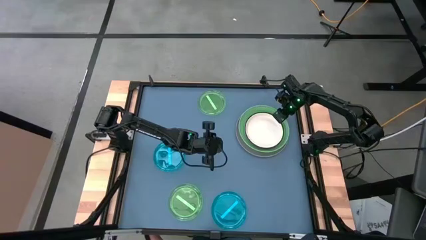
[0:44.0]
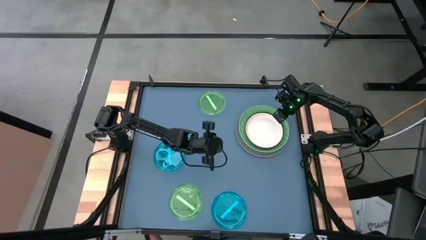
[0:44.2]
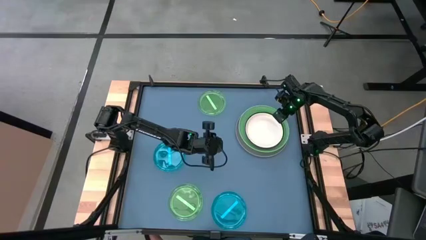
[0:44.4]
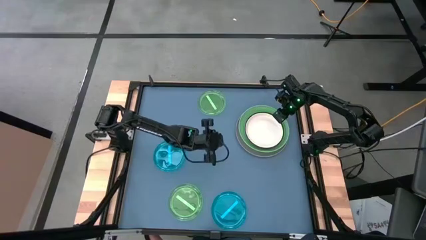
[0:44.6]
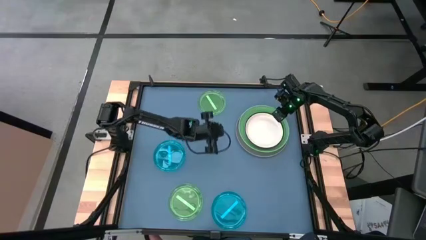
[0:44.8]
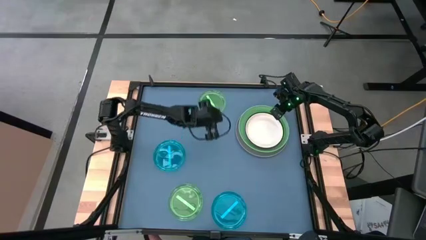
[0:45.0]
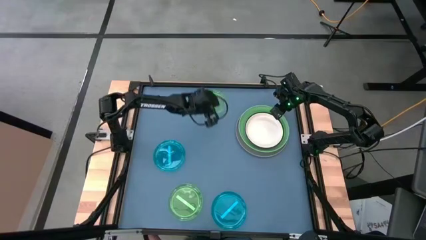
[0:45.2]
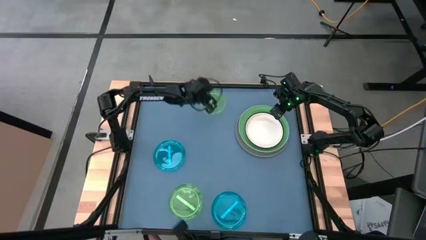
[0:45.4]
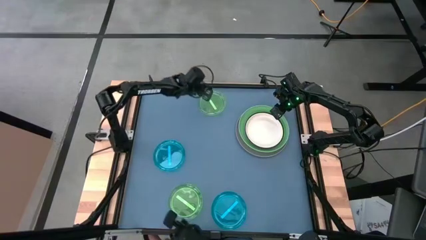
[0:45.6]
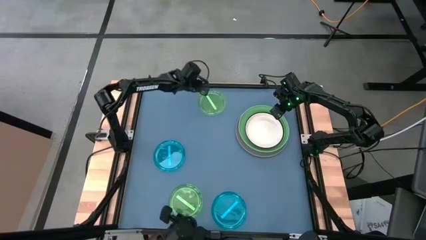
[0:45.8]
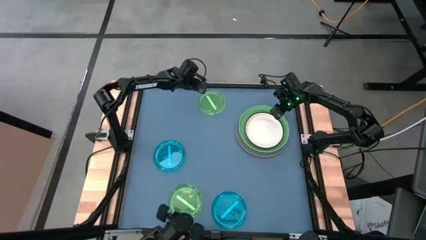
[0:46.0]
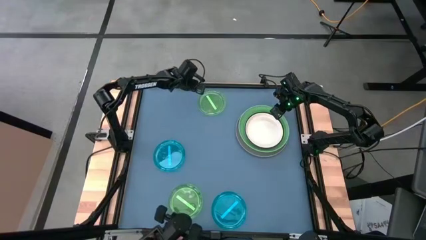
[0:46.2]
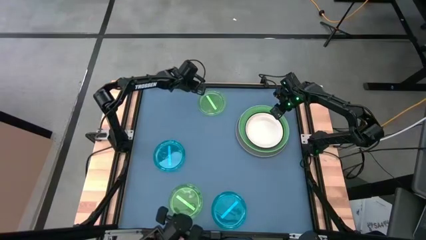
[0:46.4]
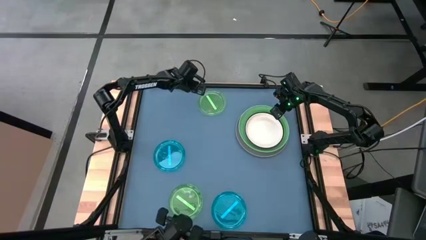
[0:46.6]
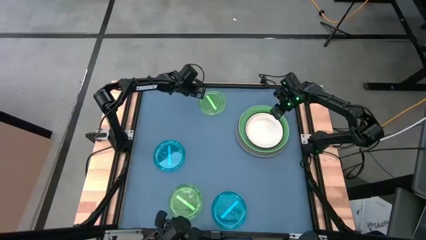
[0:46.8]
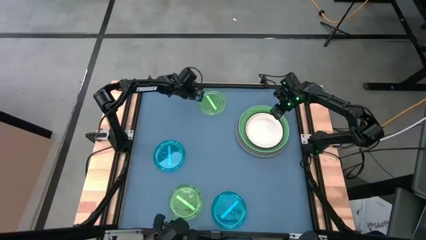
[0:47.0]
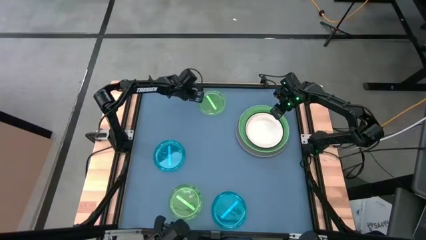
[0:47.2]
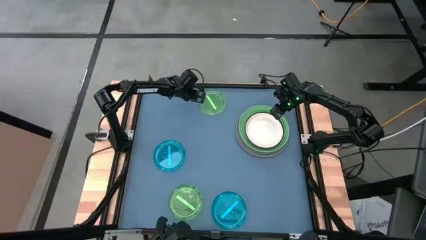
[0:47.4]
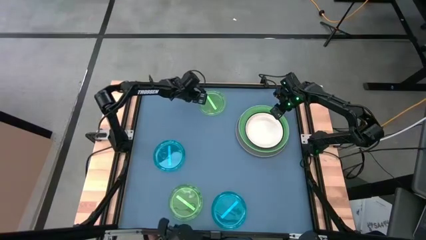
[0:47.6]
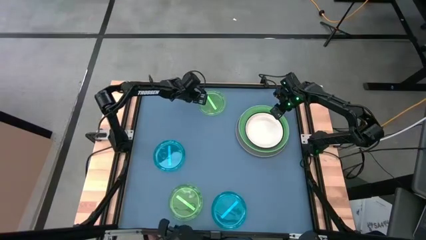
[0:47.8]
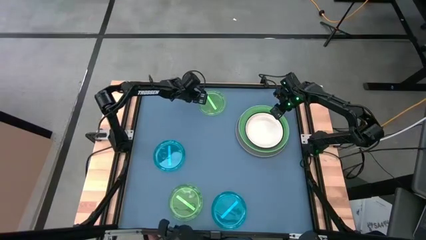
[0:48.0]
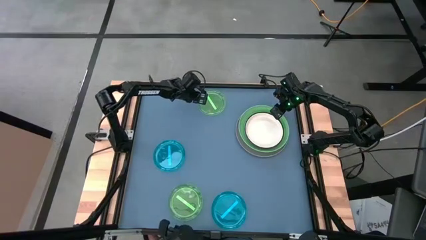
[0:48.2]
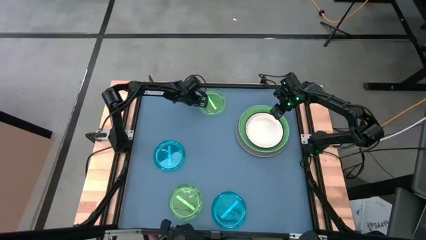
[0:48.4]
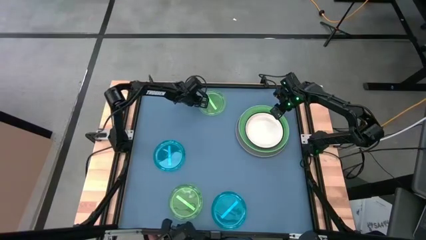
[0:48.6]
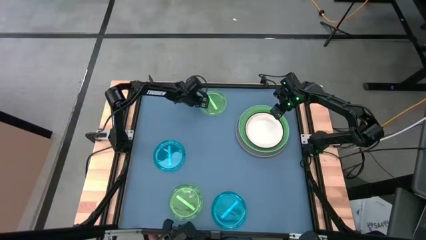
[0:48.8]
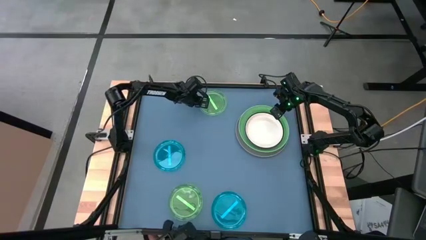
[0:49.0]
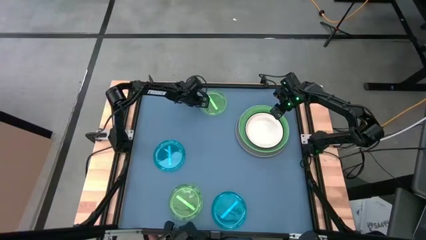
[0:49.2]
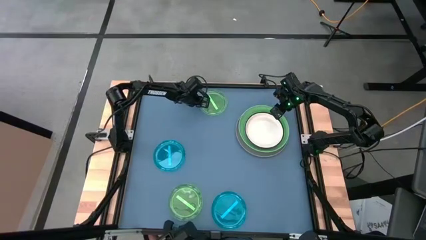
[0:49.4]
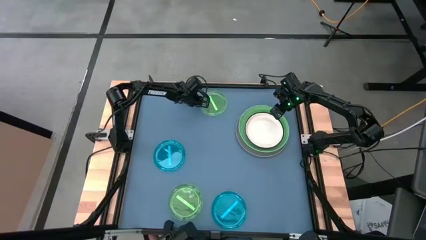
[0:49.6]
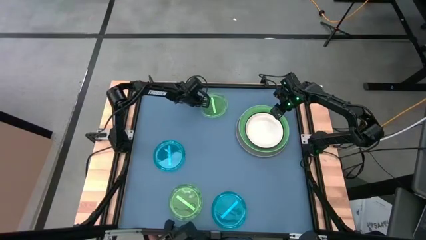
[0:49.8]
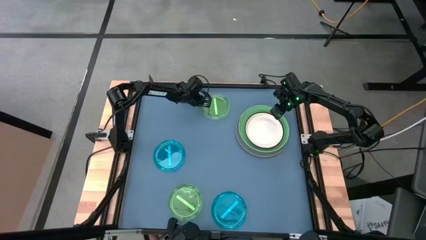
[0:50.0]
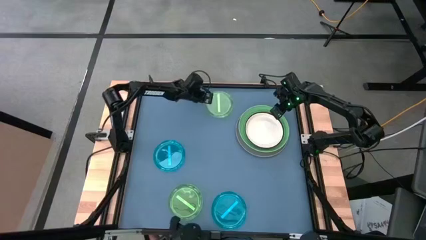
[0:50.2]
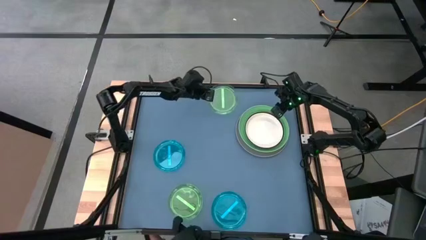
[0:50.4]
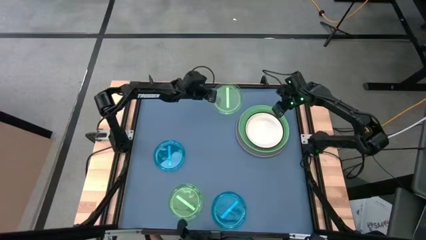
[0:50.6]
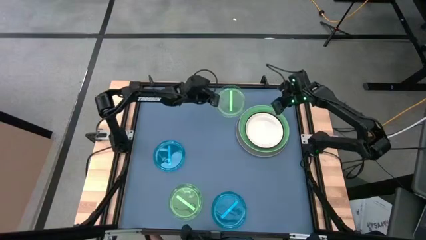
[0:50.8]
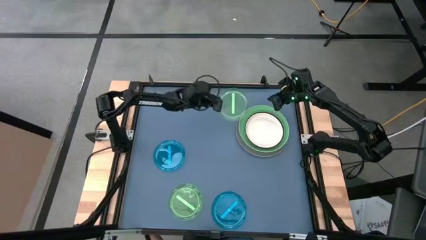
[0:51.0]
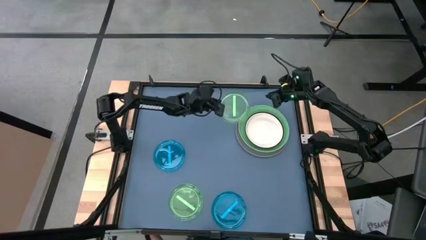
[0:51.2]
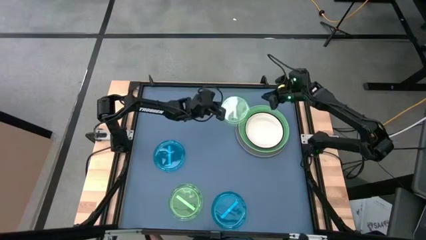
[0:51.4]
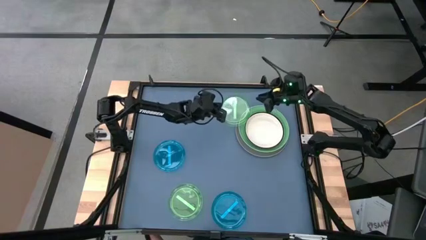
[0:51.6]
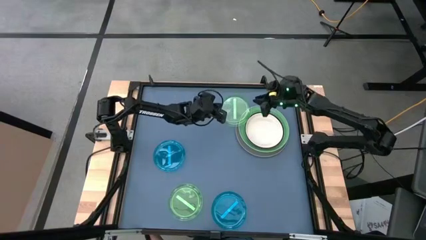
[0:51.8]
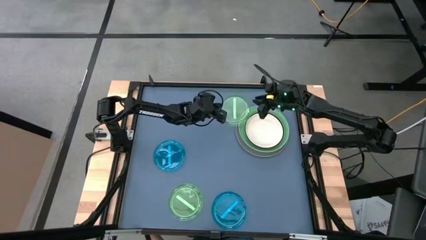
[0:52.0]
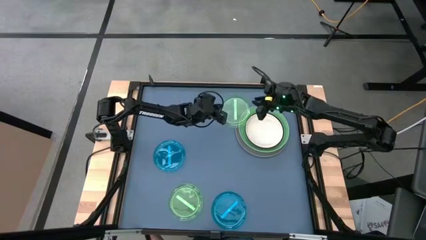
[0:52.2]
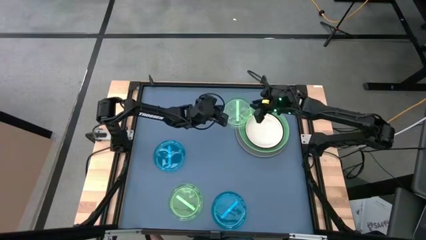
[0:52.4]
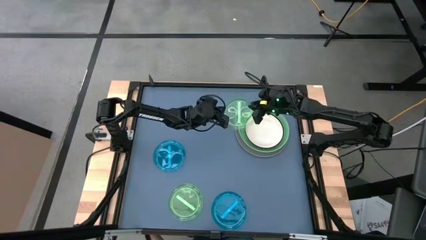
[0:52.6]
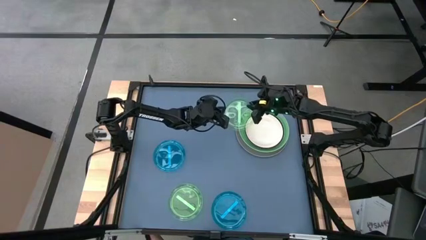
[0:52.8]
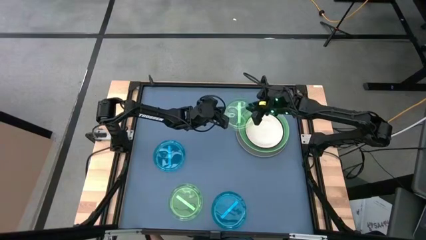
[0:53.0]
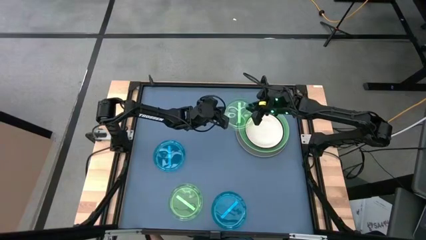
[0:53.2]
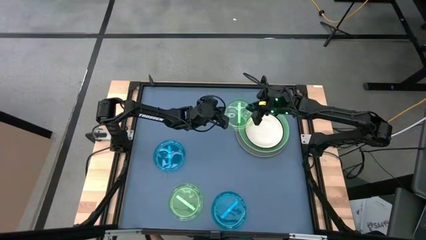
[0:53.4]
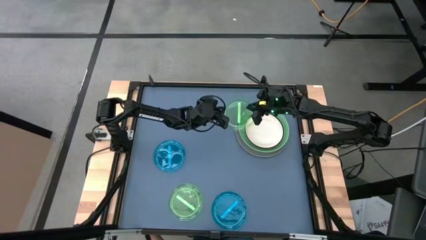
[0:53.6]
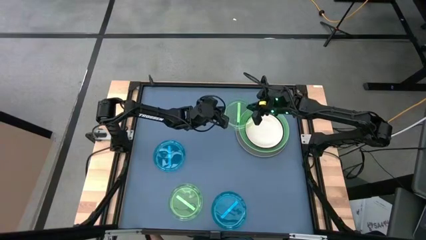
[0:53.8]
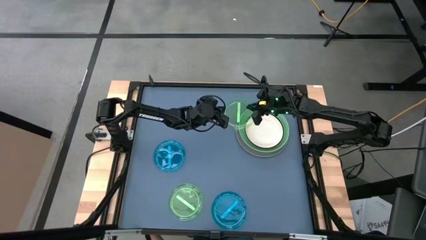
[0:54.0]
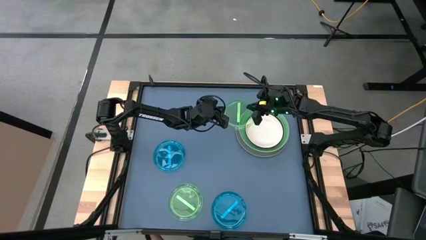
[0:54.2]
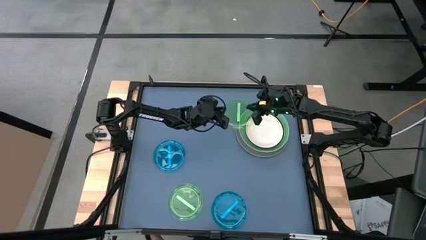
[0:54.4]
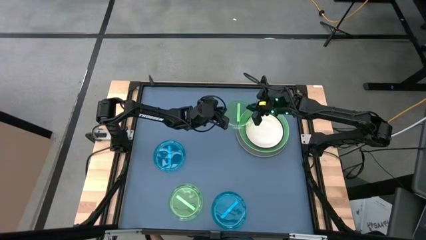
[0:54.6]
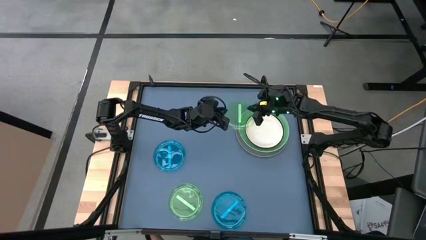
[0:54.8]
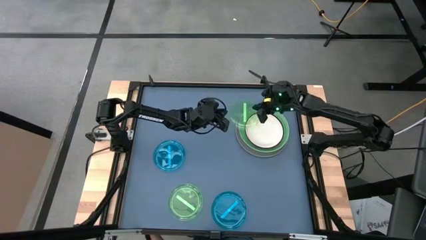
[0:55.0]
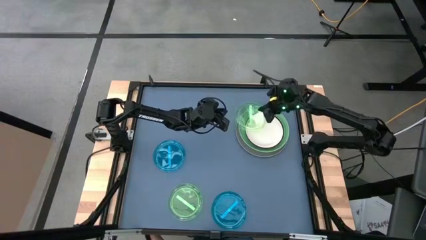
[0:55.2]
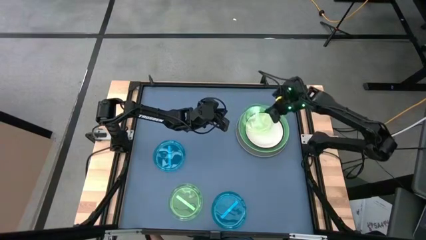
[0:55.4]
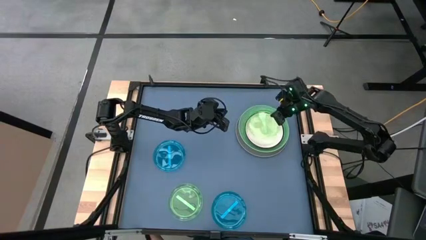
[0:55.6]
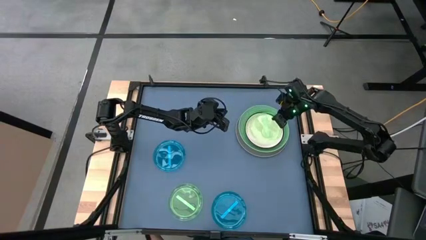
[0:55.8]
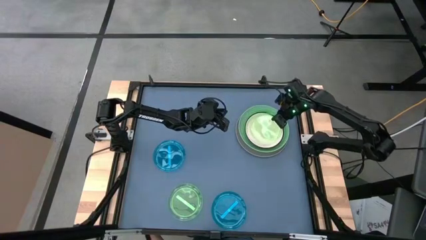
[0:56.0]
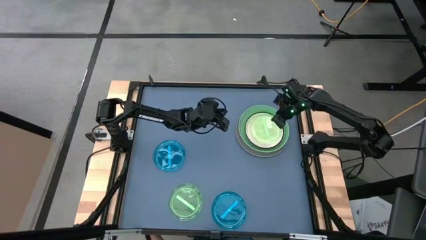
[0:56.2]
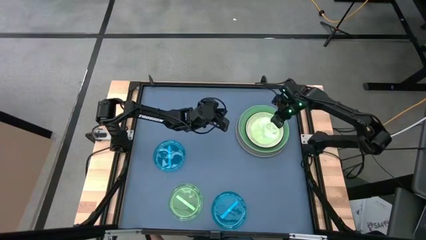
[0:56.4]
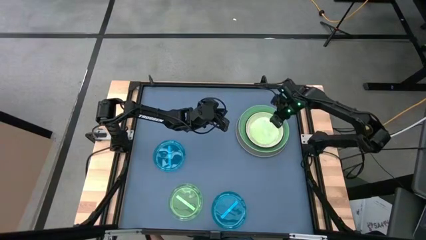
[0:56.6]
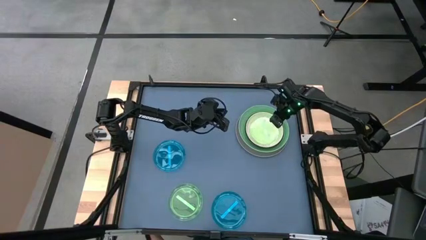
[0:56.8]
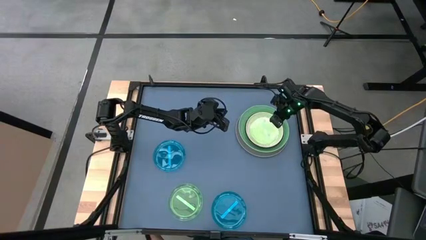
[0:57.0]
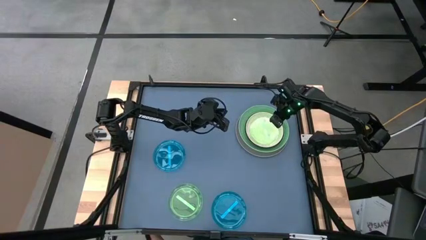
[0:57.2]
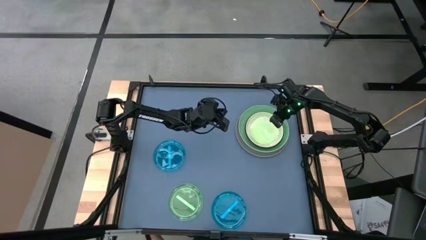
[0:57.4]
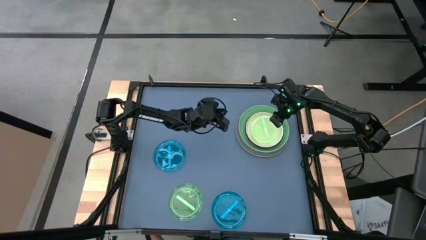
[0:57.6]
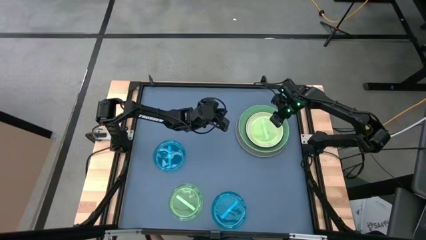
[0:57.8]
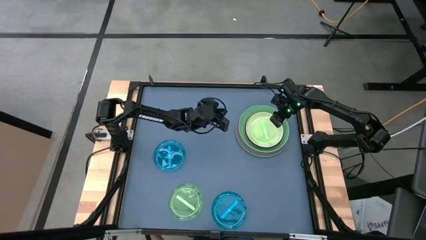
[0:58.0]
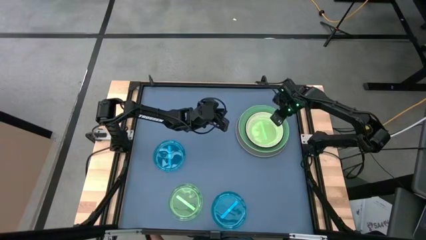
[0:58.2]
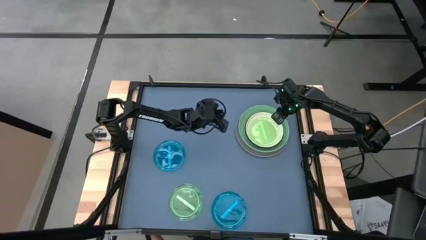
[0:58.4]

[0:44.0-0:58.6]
Task: Stack plastic plates
Stack the top small light green plate on the white plate
